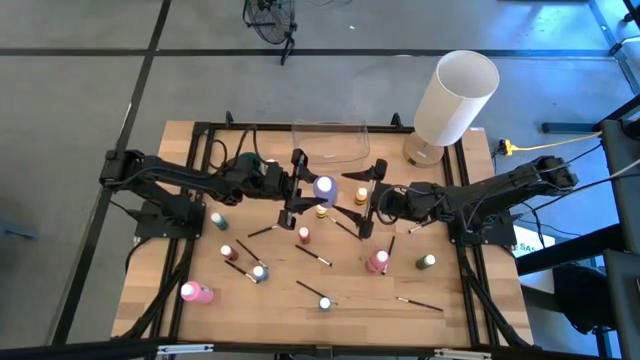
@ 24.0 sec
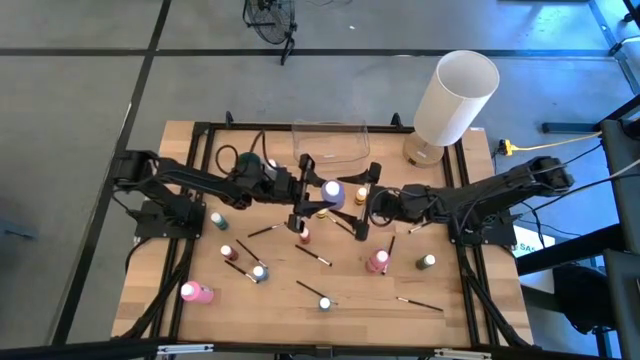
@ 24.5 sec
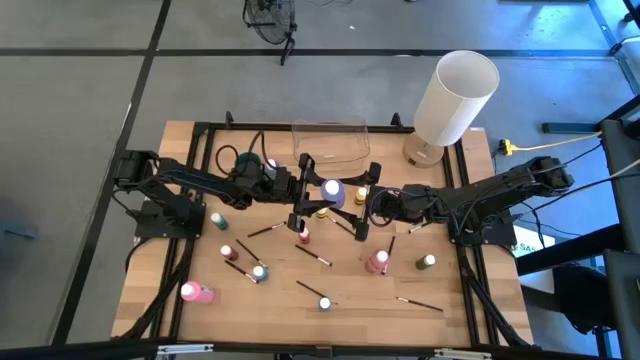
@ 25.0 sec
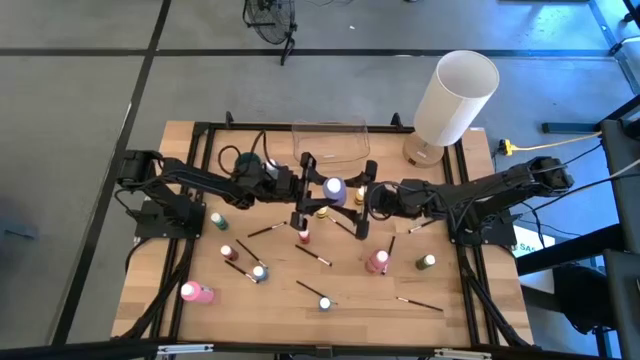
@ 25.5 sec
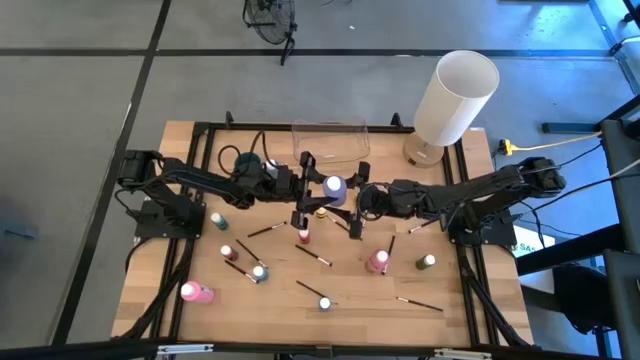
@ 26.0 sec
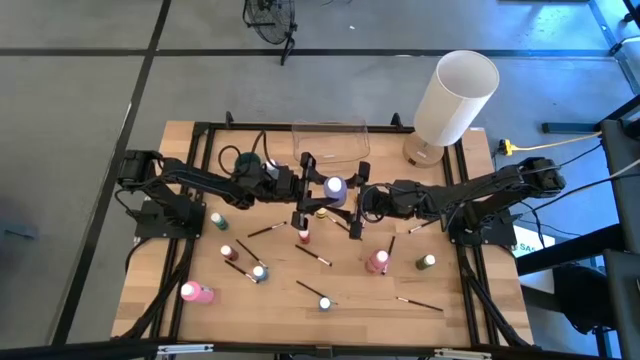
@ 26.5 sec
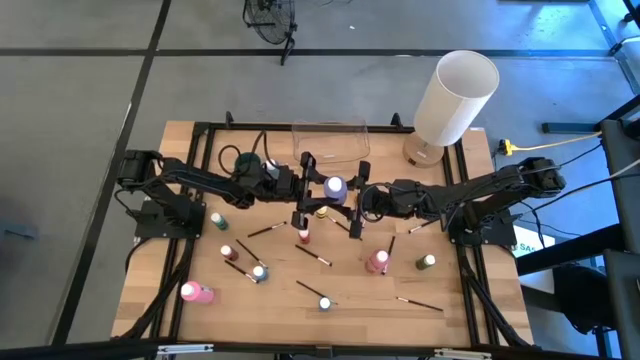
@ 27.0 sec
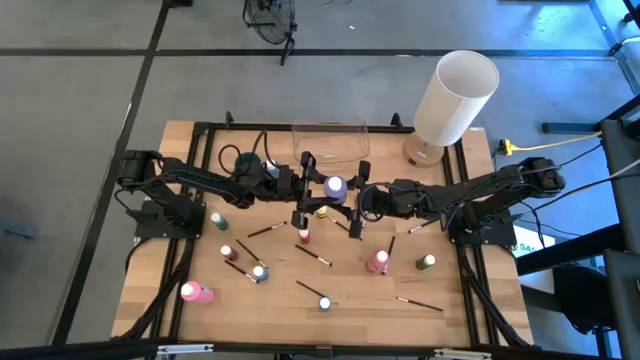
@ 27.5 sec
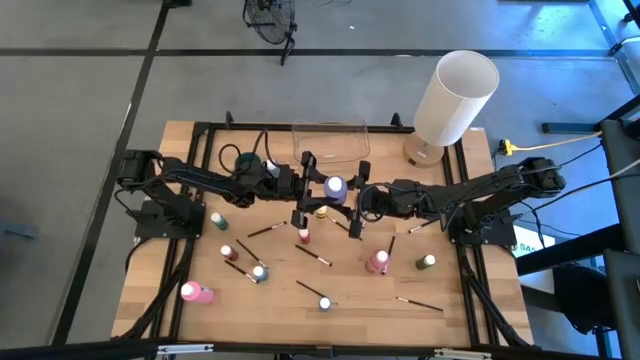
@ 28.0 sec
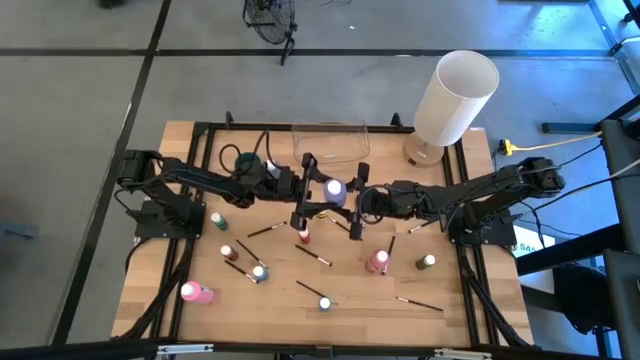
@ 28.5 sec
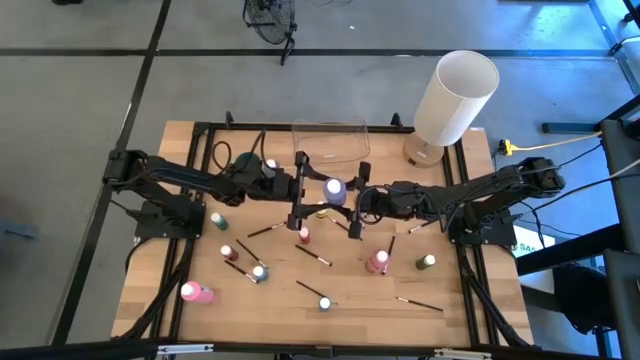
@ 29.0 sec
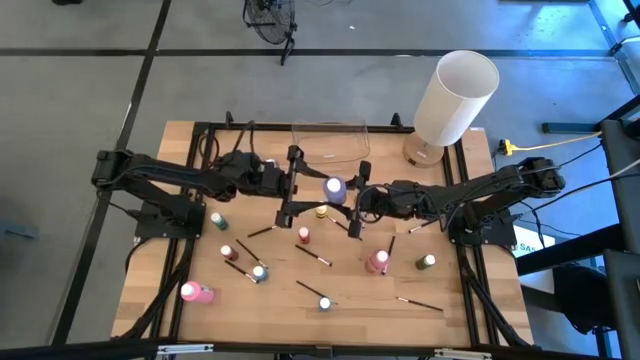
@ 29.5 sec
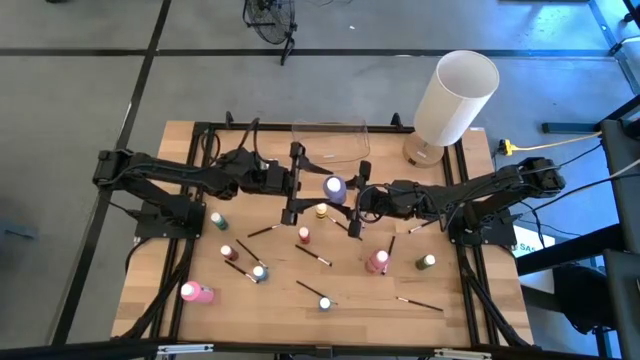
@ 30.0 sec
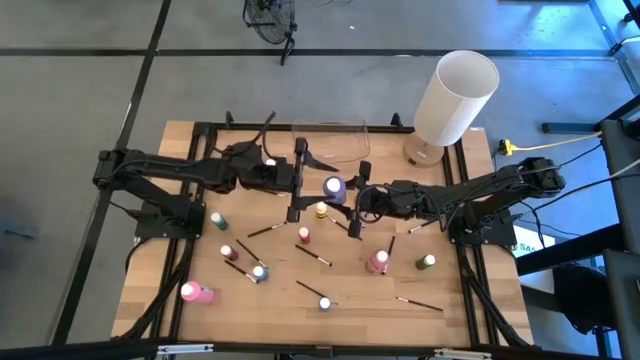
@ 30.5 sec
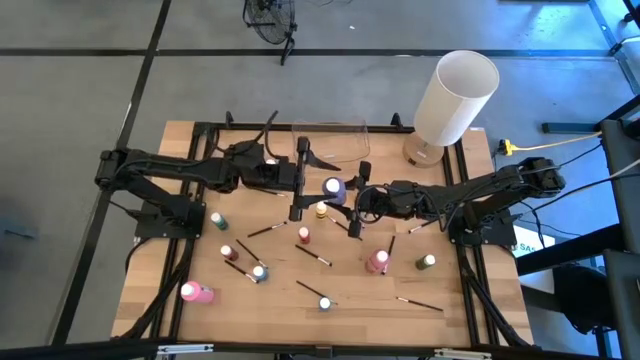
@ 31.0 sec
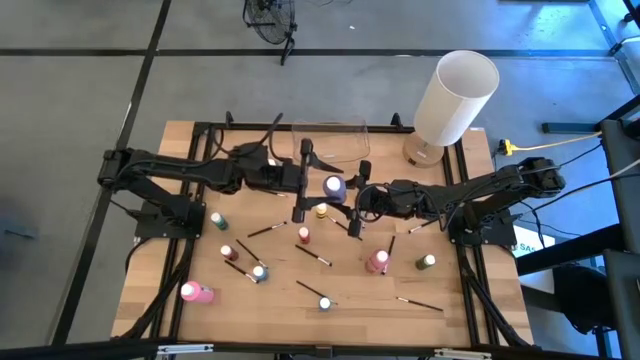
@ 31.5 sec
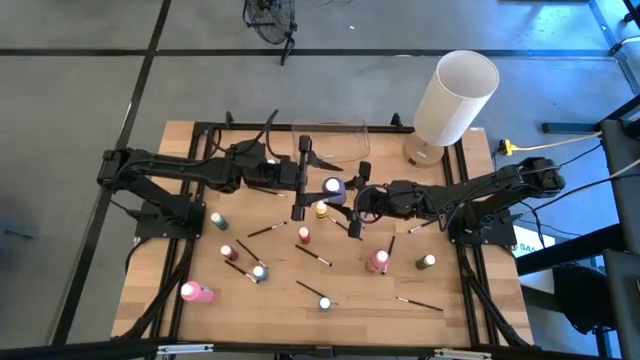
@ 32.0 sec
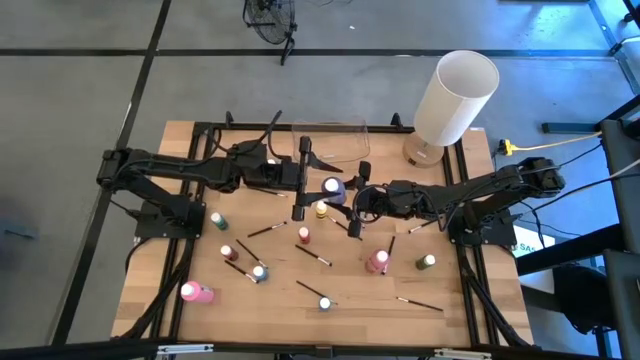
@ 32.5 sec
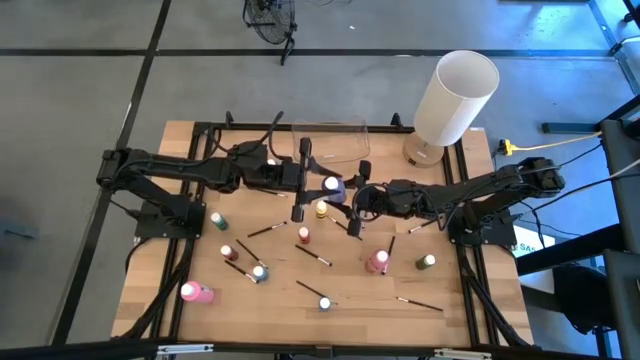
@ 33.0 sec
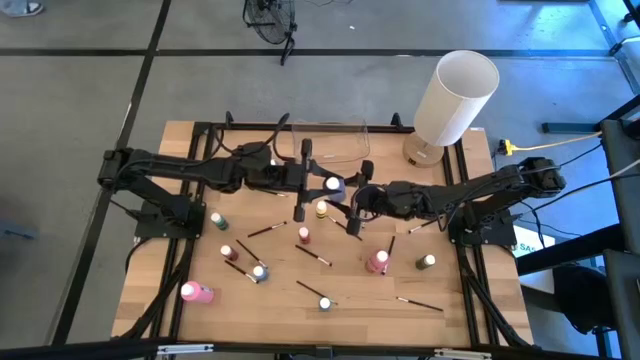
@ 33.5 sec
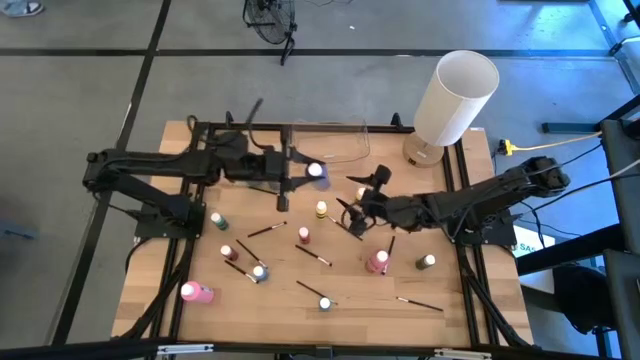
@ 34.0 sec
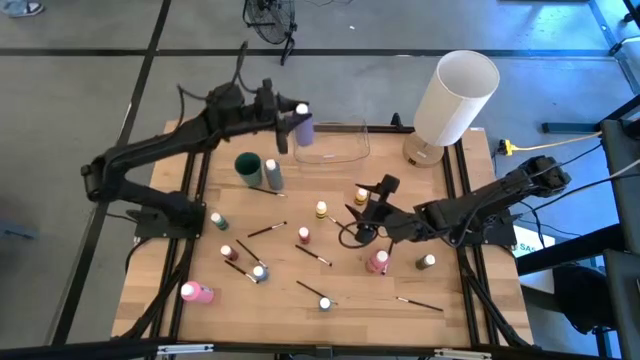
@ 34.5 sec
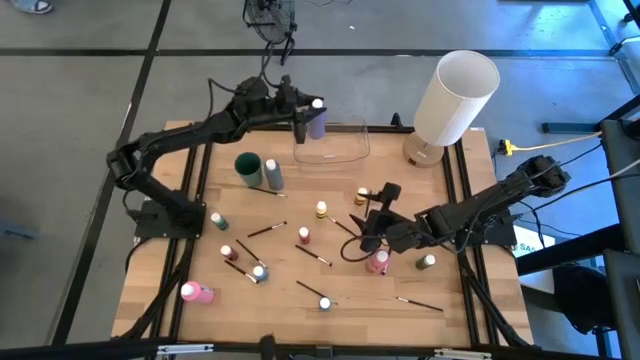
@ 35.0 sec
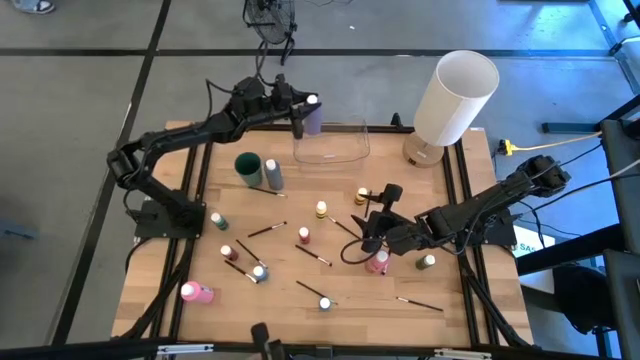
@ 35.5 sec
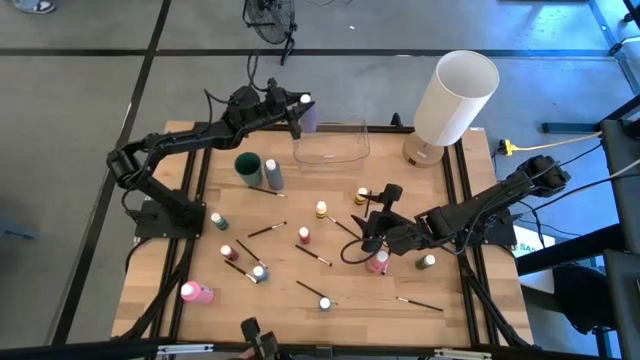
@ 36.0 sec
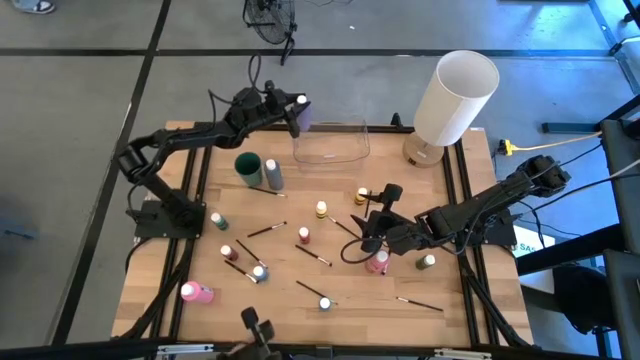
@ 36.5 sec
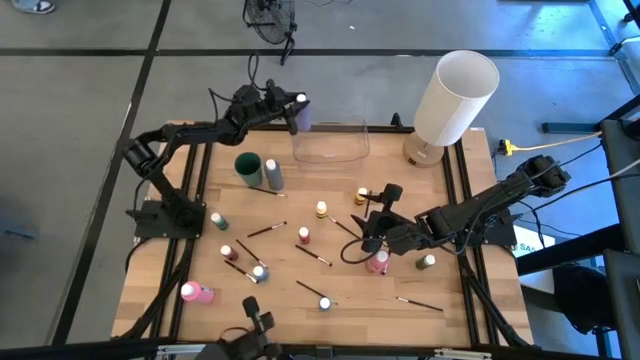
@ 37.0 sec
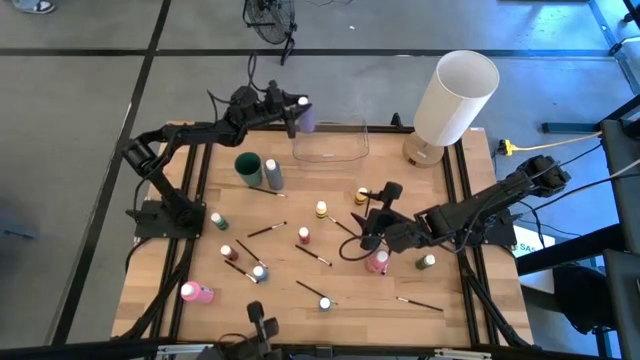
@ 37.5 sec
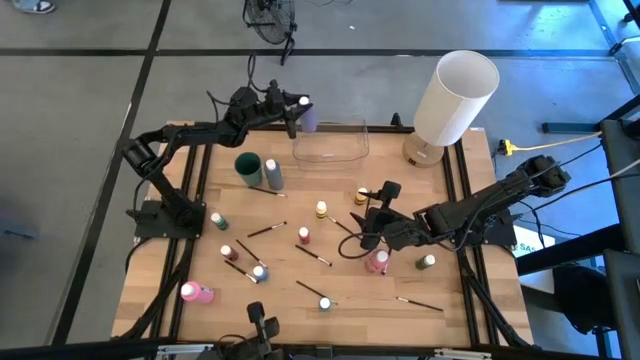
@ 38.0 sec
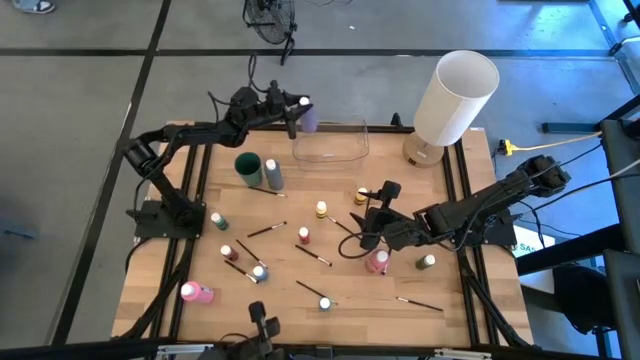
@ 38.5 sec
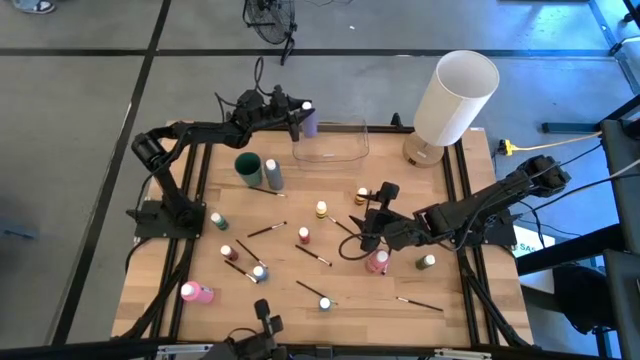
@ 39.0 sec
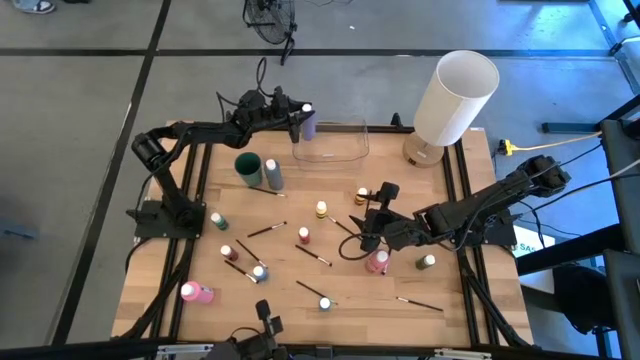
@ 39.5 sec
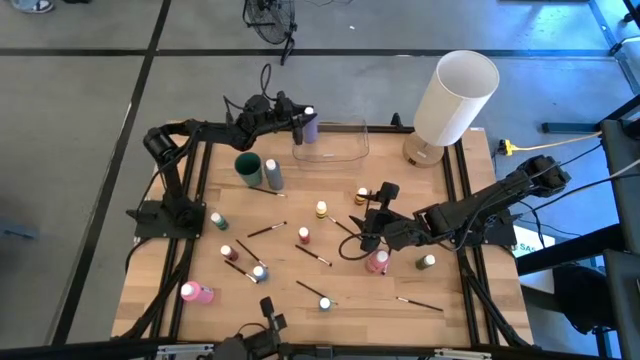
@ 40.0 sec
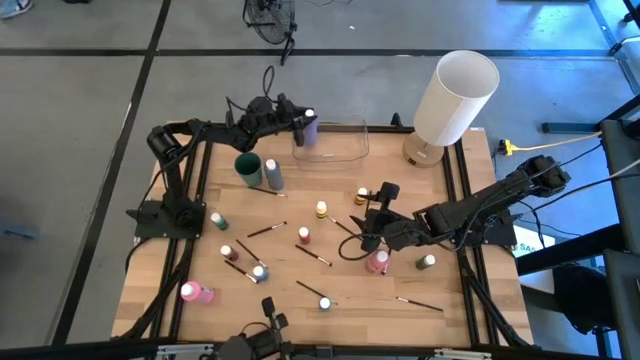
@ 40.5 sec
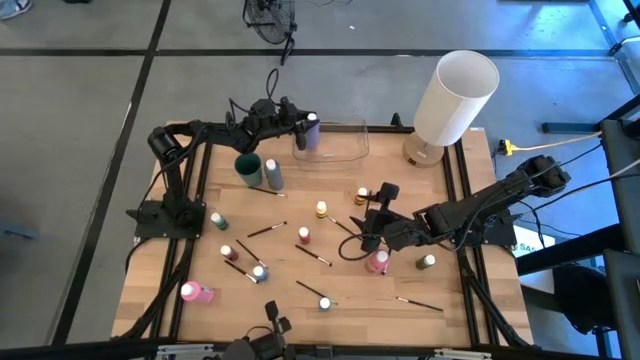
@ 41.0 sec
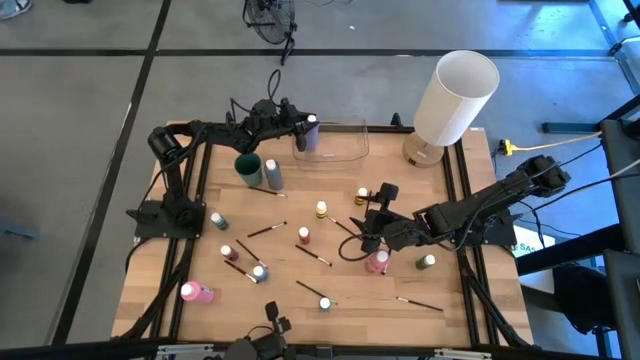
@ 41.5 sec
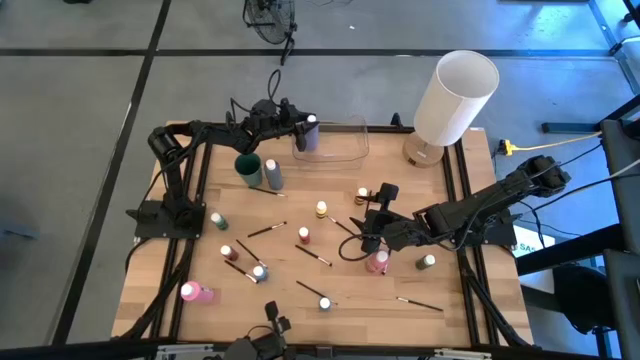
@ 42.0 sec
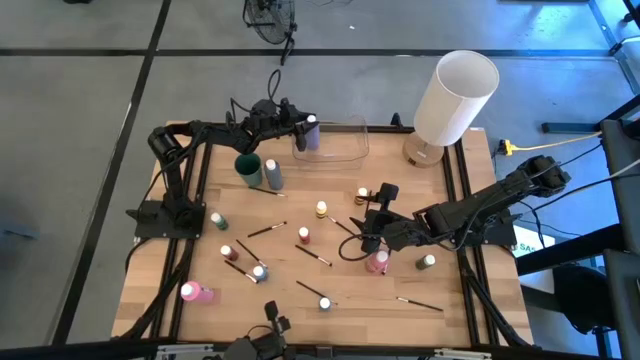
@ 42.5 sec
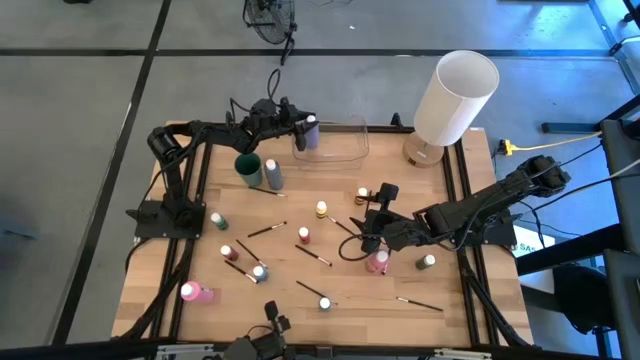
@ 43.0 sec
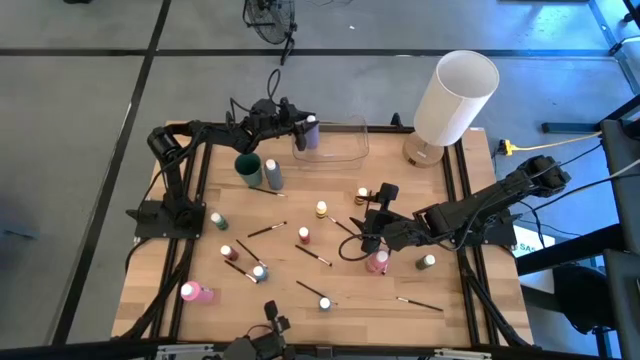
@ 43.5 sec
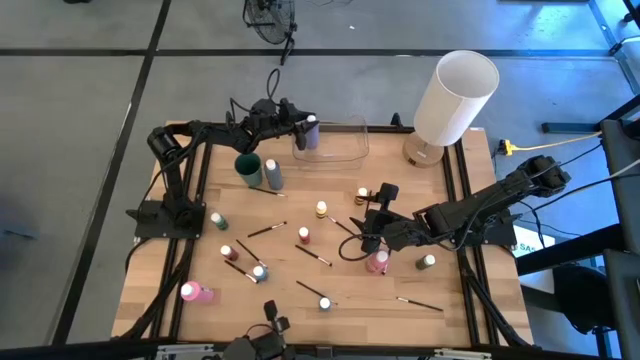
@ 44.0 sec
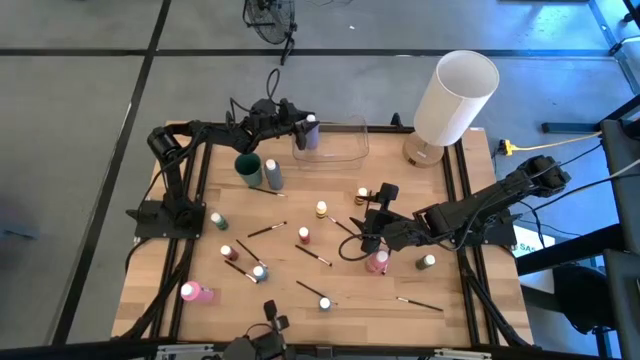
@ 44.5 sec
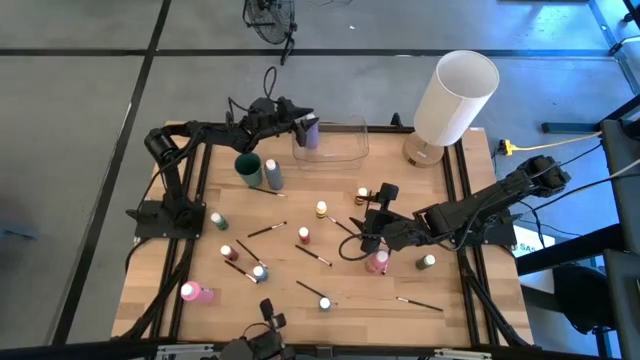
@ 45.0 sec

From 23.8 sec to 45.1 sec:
Task: Pick & Place Paint Supplies
Put the violet bottle into the transparent bin
